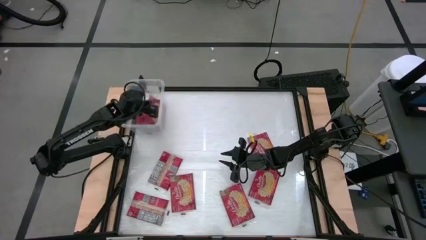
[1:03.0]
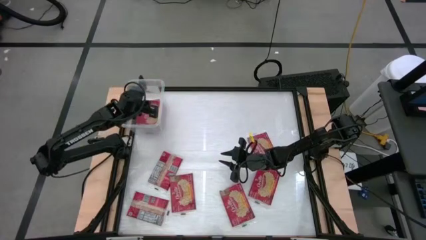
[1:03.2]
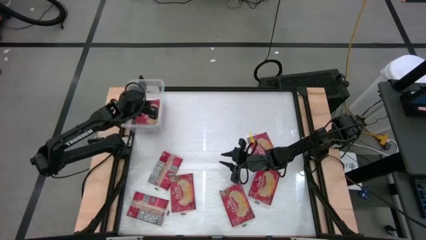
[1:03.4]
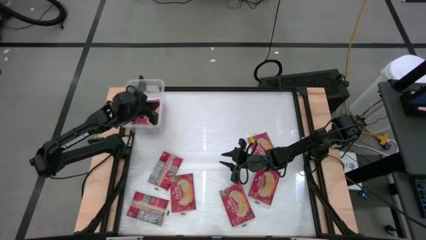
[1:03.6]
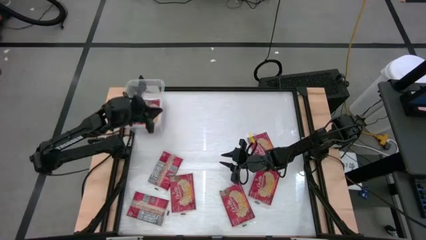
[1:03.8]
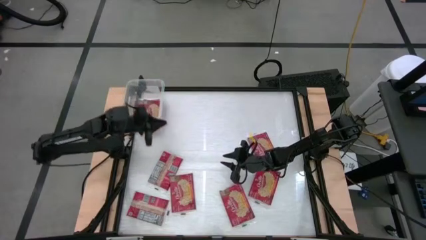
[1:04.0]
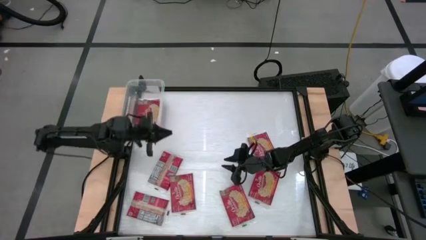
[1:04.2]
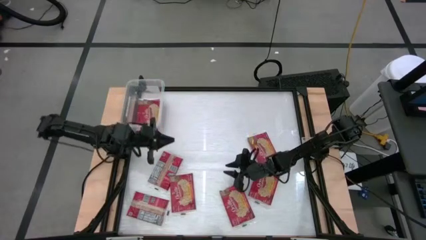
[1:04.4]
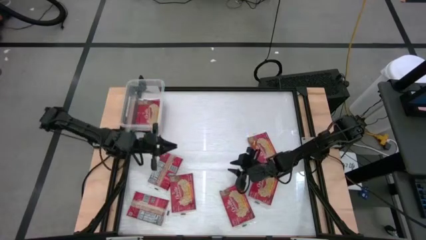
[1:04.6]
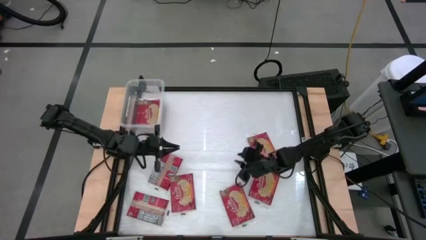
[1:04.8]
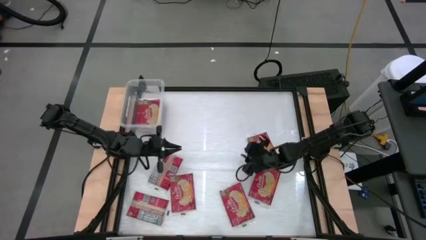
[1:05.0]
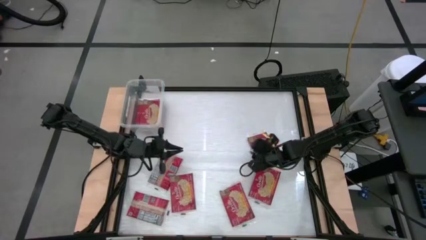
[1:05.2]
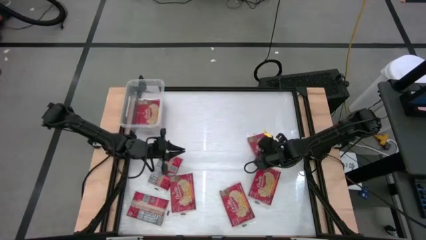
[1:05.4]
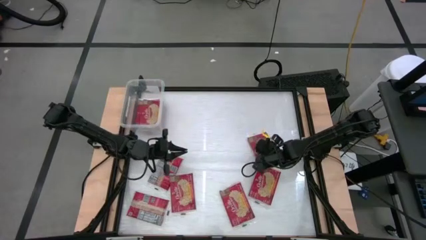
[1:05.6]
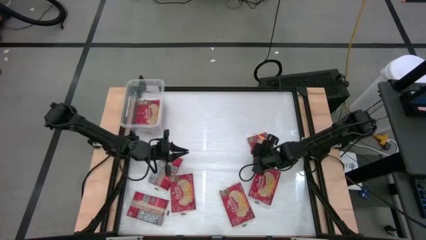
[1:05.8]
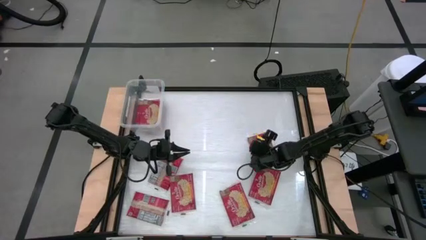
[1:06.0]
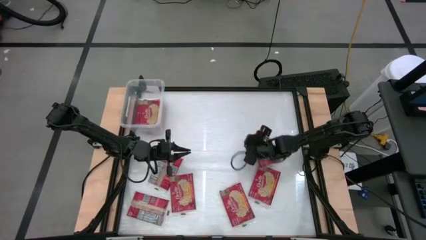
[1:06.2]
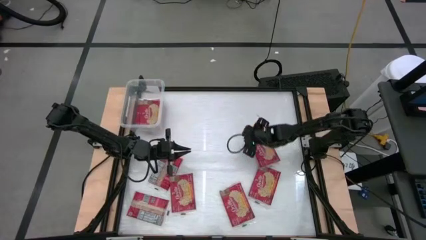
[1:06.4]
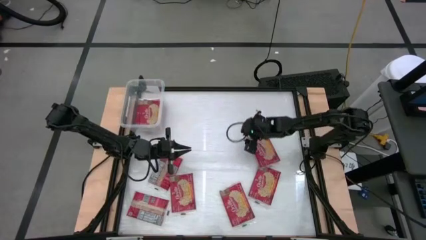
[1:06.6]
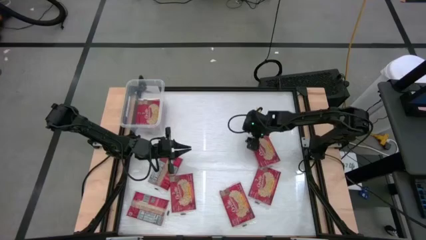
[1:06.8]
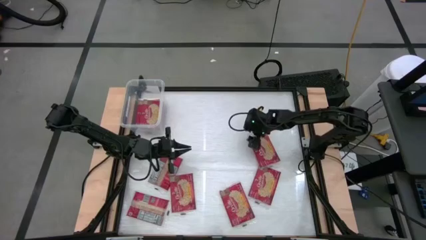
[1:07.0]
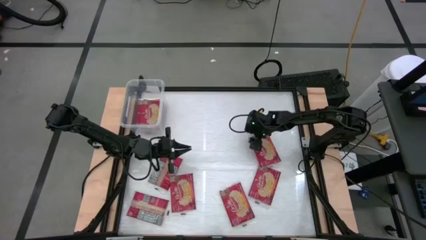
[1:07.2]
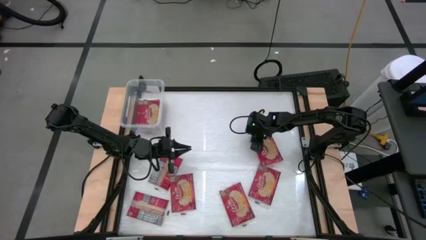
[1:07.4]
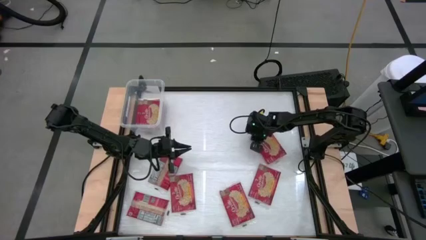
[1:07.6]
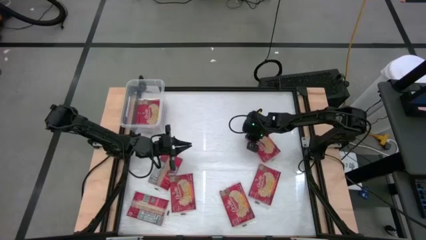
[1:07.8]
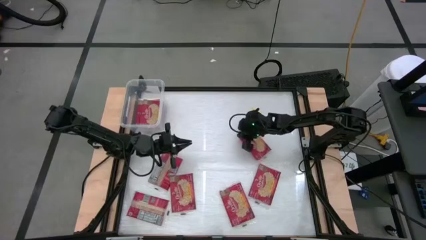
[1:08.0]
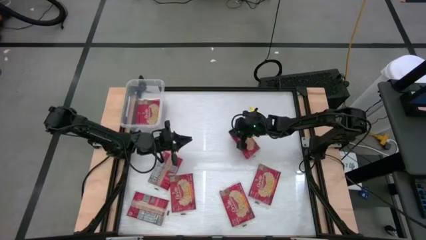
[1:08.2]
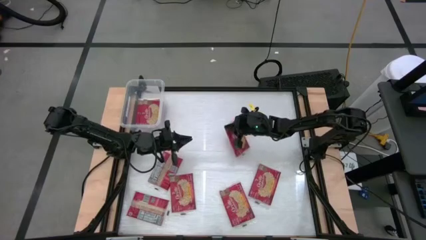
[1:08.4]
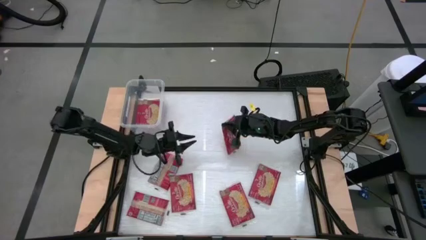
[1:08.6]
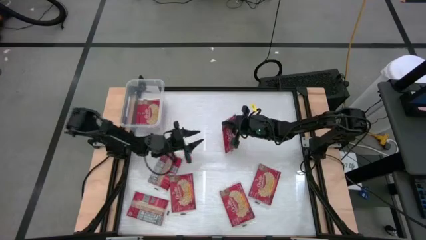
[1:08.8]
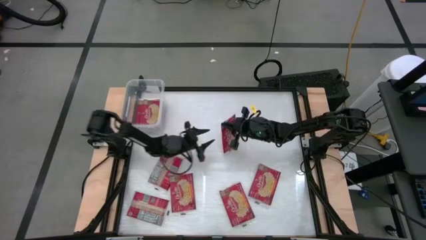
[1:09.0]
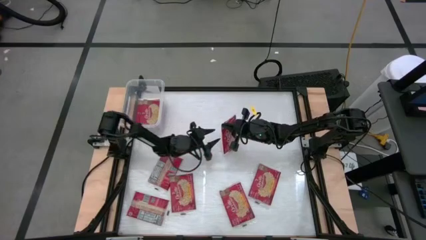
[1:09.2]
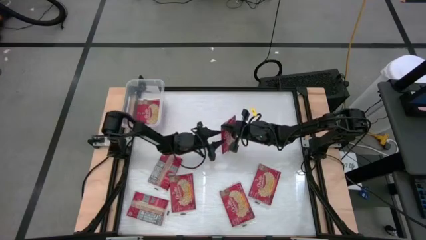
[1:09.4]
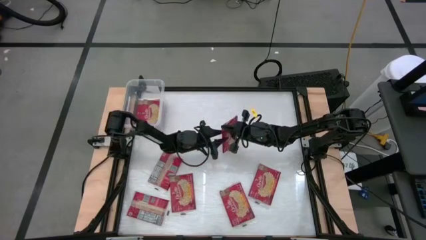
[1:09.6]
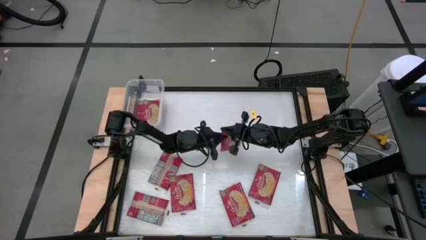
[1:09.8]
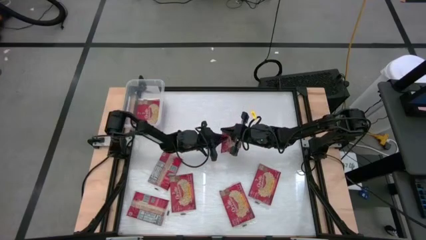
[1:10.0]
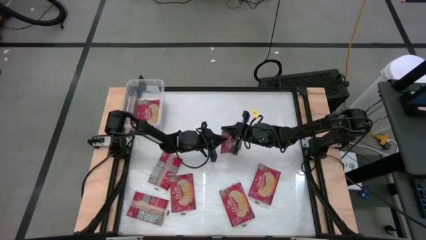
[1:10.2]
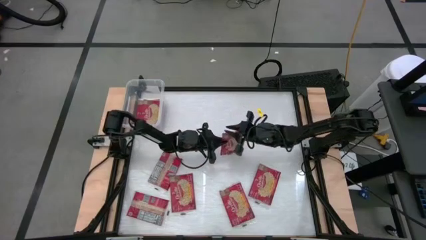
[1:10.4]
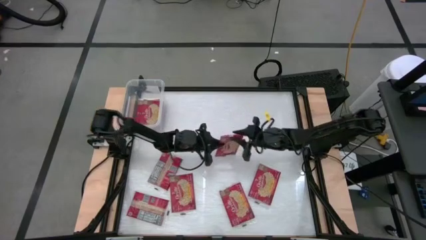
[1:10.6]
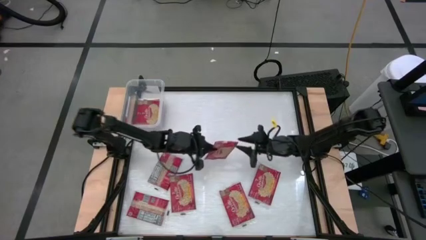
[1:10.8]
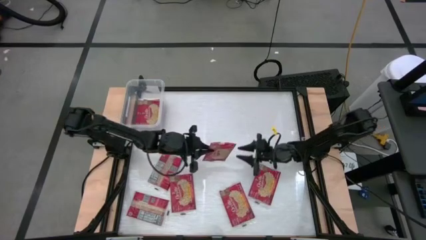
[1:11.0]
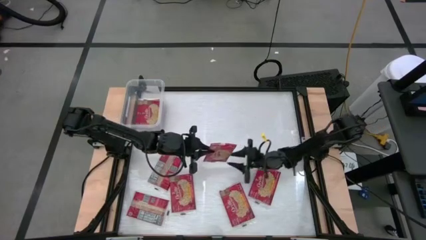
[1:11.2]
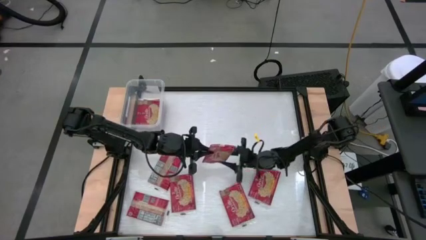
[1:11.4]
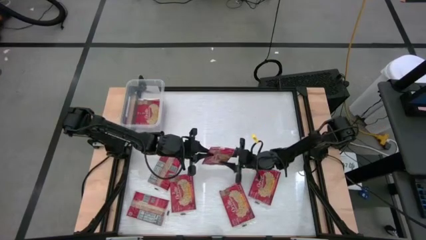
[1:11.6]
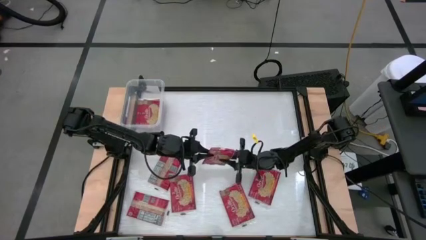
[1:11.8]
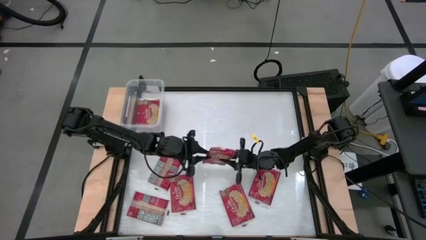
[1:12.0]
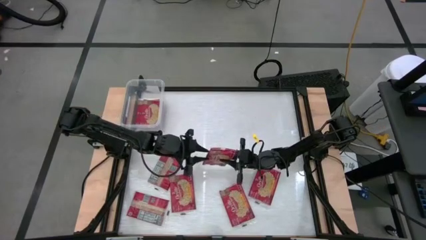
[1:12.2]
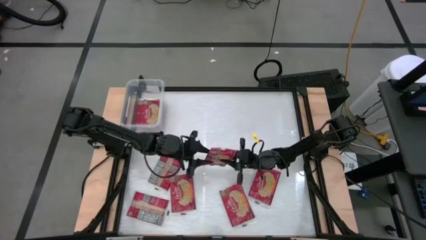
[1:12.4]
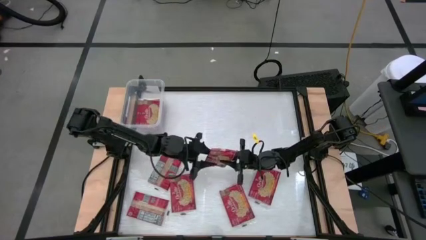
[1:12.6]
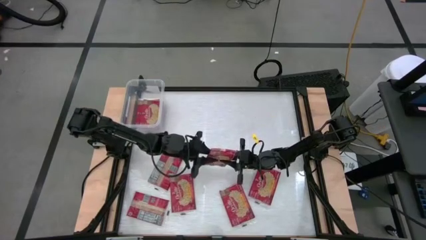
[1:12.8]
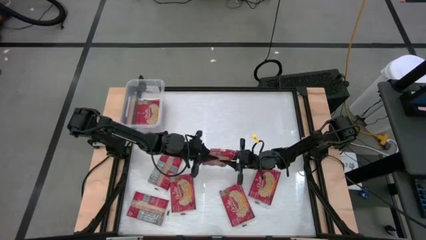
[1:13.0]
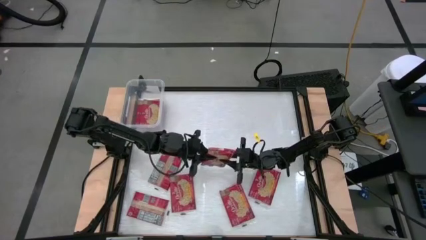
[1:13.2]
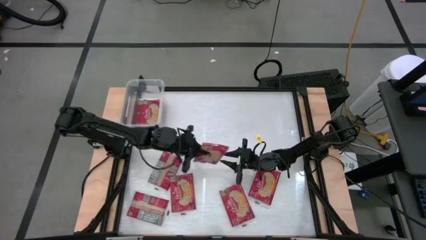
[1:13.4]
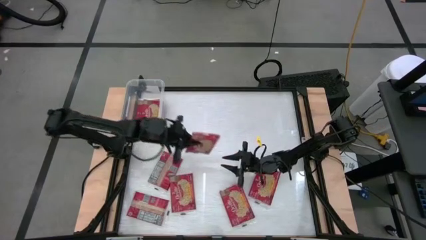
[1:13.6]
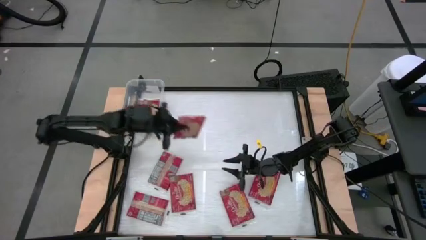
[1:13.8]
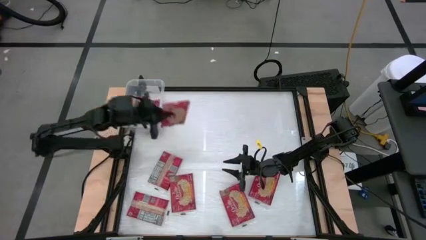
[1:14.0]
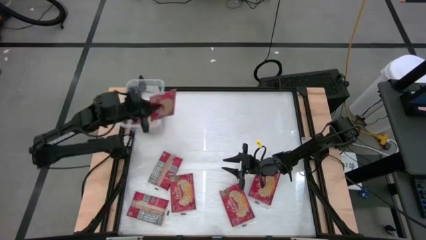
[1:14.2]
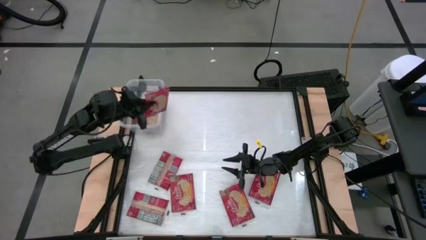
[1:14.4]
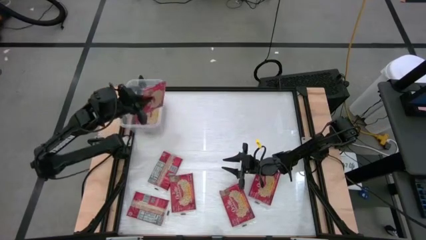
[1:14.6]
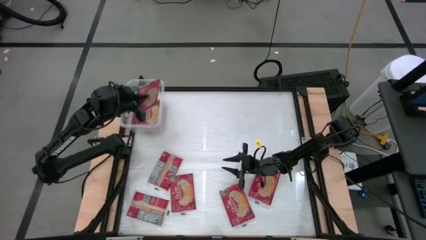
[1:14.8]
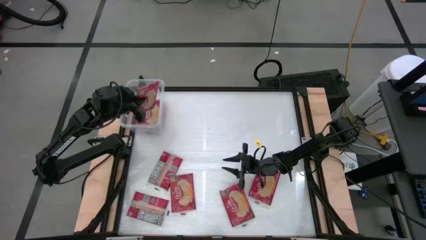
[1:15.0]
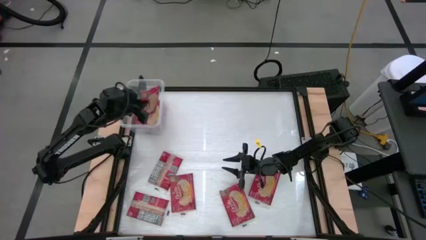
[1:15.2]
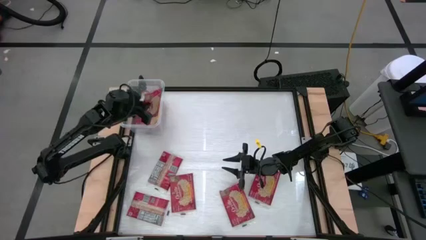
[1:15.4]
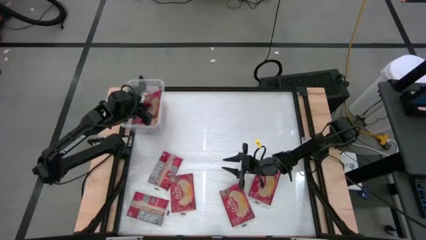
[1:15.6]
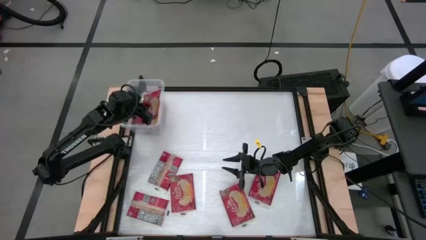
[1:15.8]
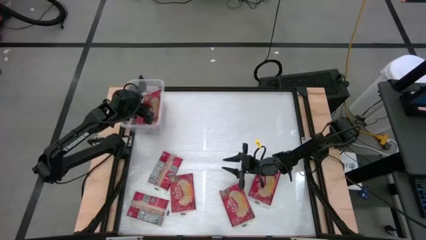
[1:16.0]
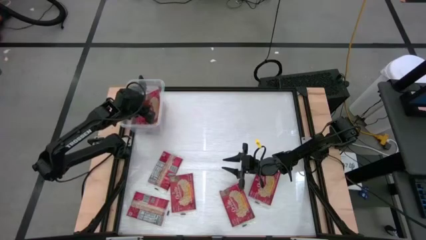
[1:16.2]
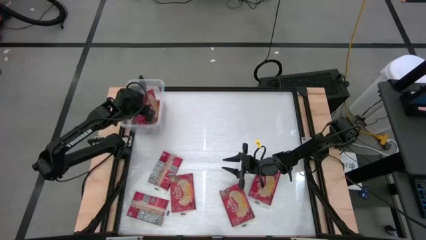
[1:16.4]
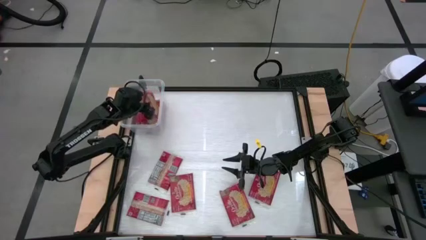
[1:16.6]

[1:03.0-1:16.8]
Task: Sort popcorn bags into baskets
Stack the red popcorn pack into the bin

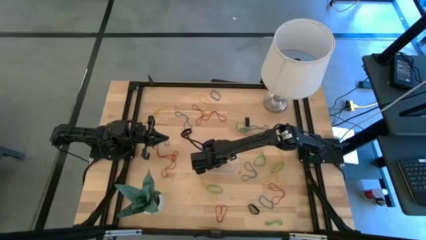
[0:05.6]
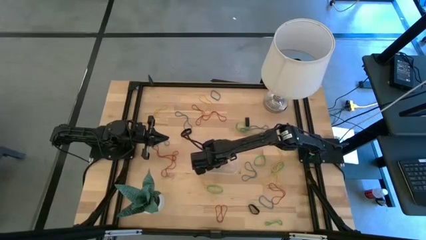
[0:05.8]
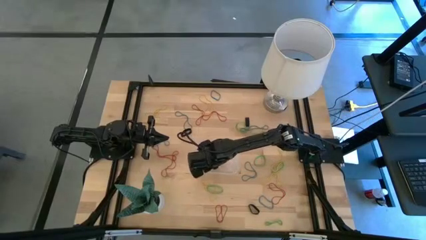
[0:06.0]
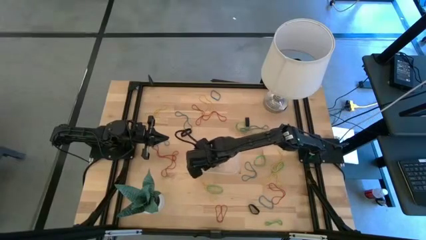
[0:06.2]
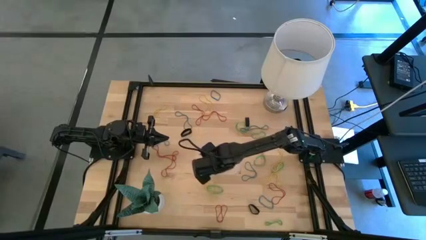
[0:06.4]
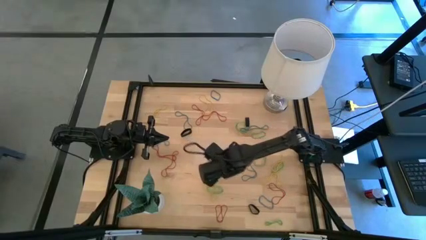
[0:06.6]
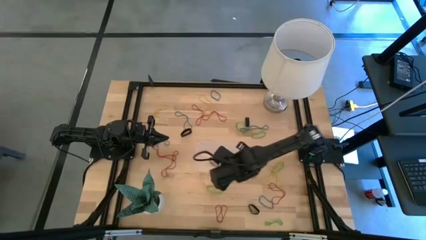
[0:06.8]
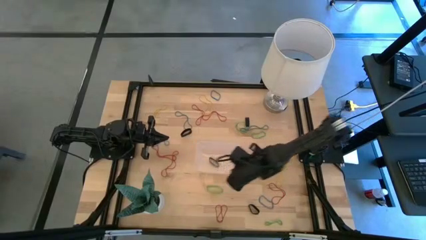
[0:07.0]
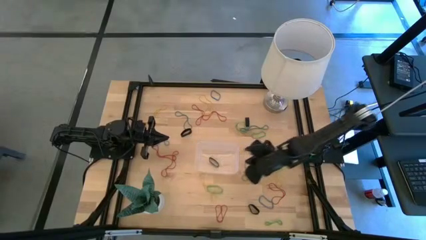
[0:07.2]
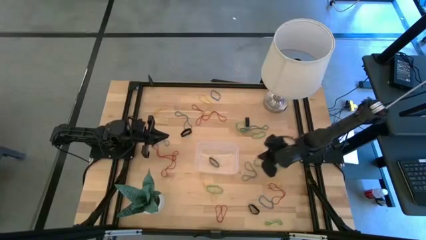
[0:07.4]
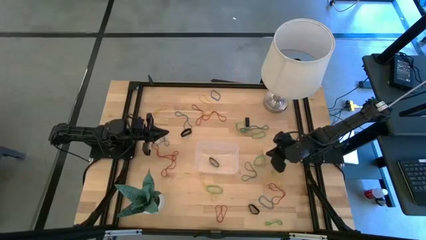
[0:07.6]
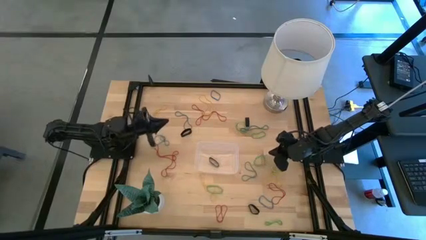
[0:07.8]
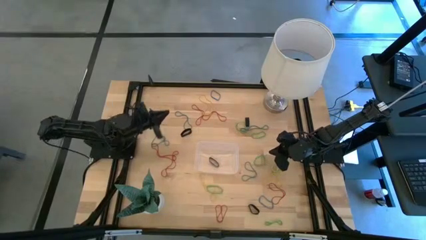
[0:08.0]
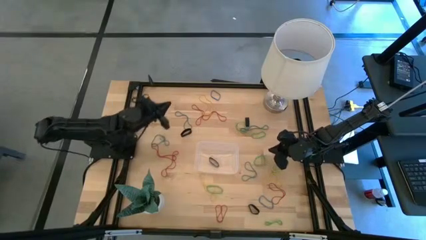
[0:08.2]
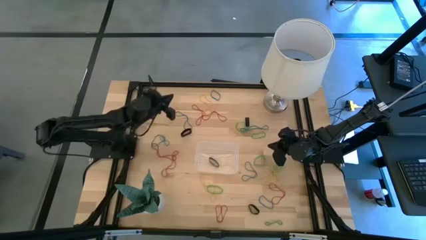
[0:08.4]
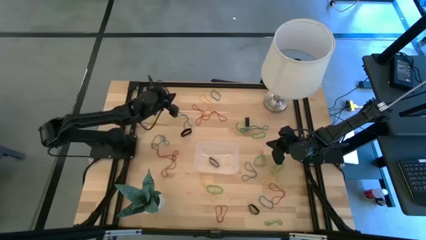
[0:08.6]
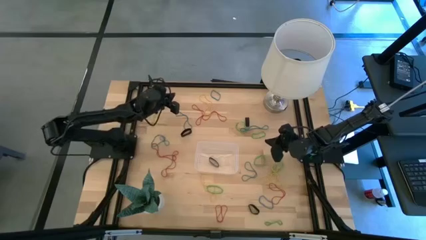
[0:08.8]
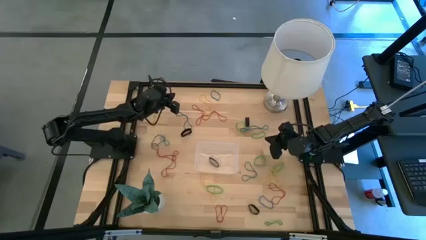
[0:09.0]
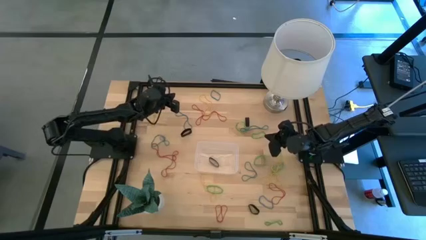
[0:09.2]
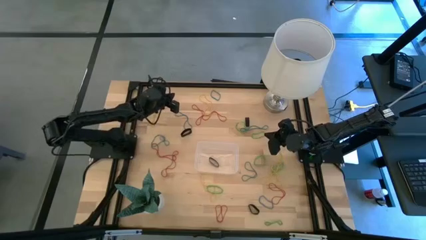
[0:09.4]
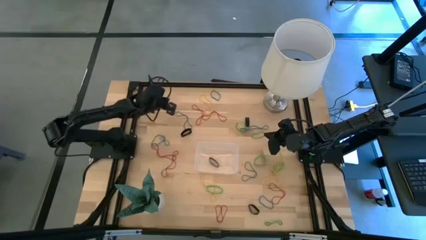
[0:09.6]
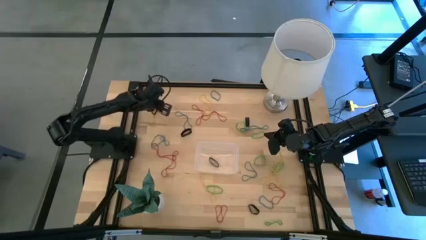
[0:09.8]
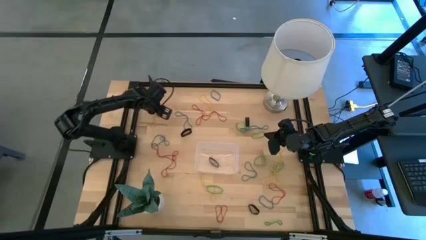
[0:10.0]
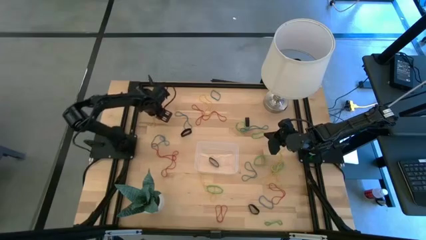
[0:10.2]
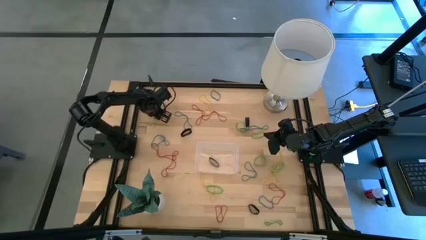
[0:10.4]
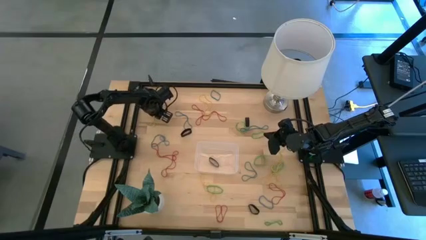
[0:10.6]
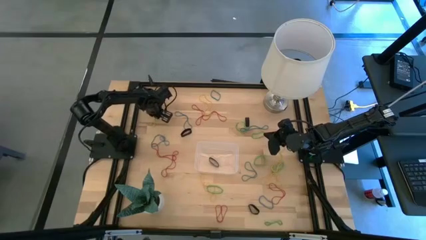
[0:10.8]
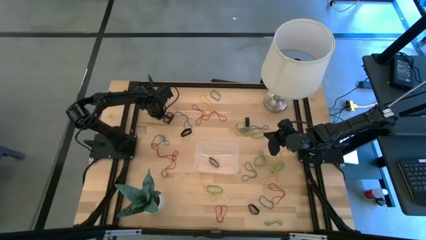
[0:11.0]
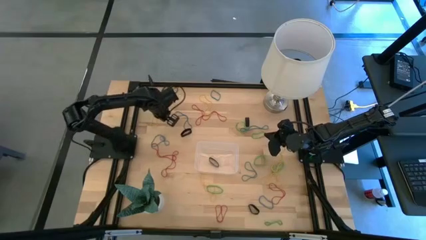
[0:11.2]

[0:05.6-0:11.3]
Task: Pick and place rubber bands into bin
Put the yellow rubber band into the transparent bin
